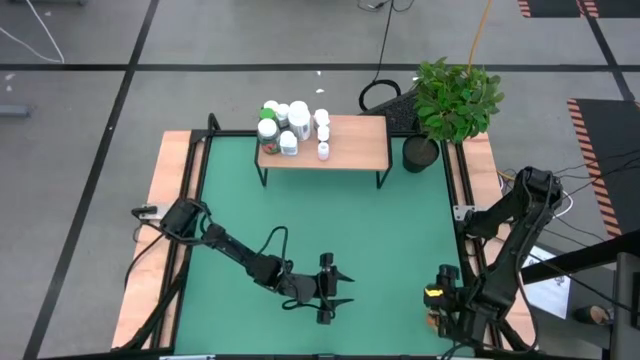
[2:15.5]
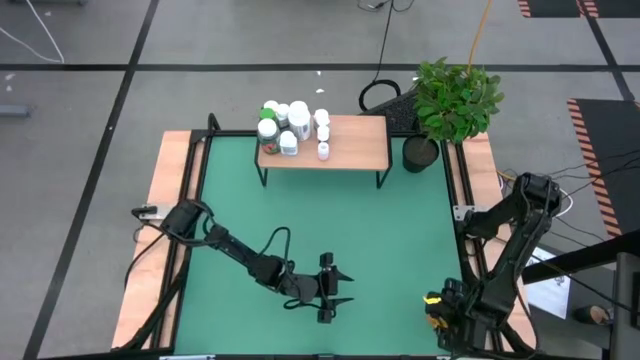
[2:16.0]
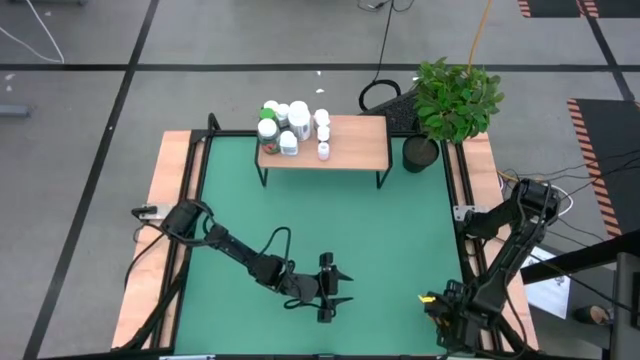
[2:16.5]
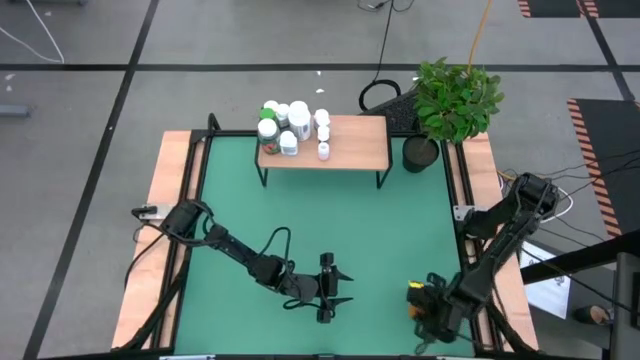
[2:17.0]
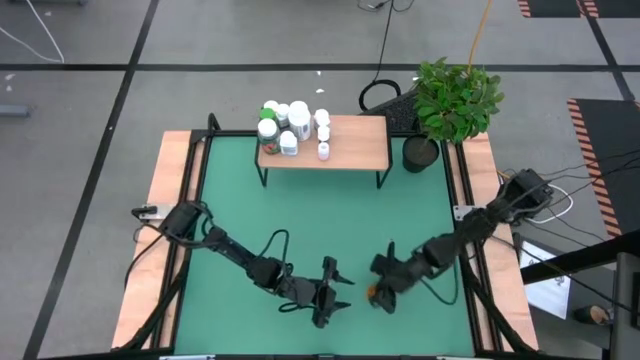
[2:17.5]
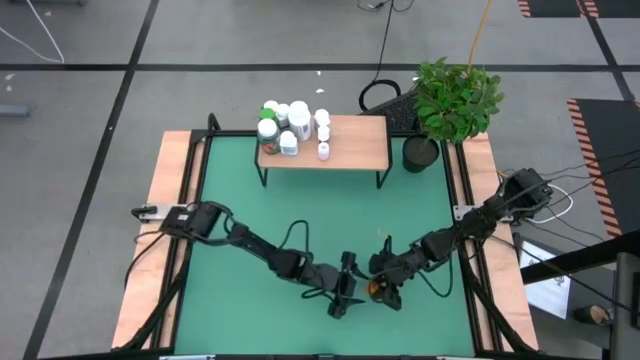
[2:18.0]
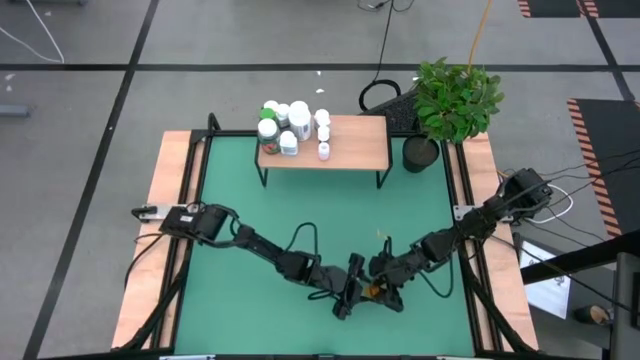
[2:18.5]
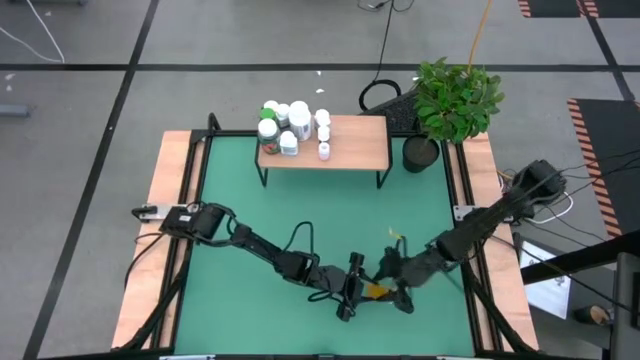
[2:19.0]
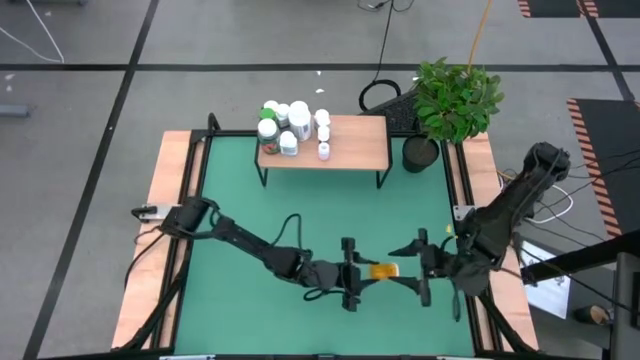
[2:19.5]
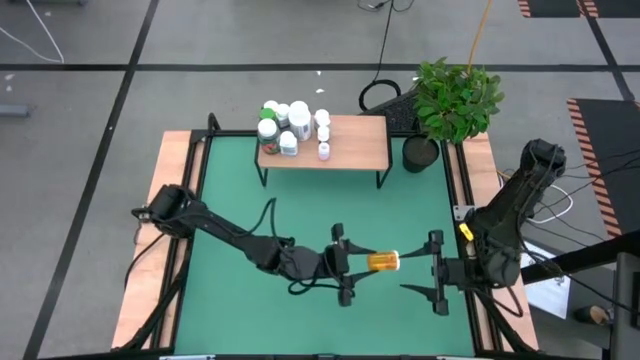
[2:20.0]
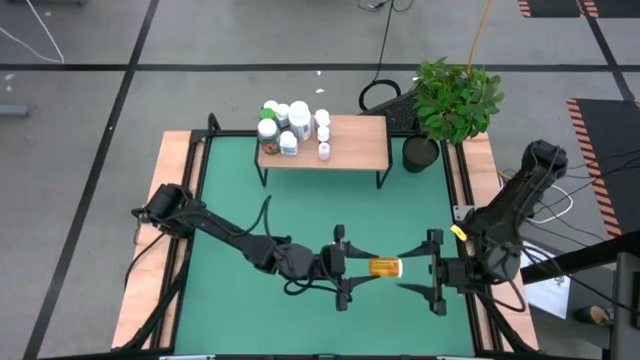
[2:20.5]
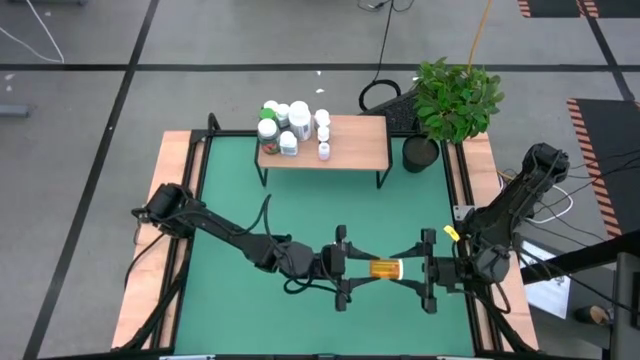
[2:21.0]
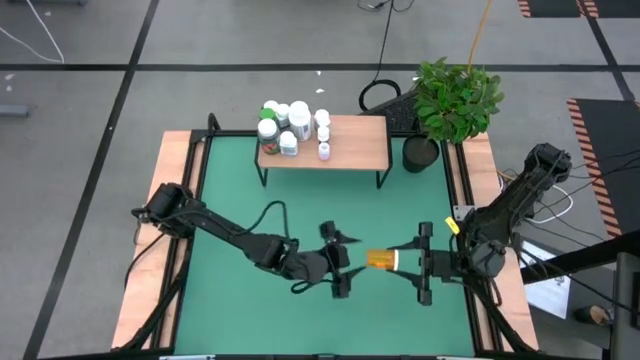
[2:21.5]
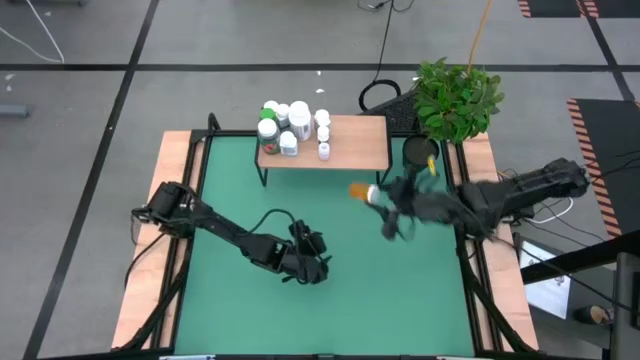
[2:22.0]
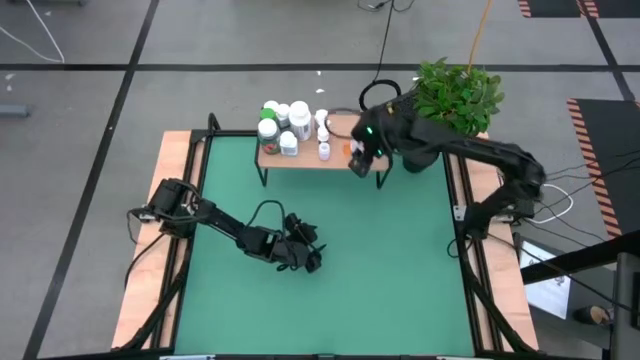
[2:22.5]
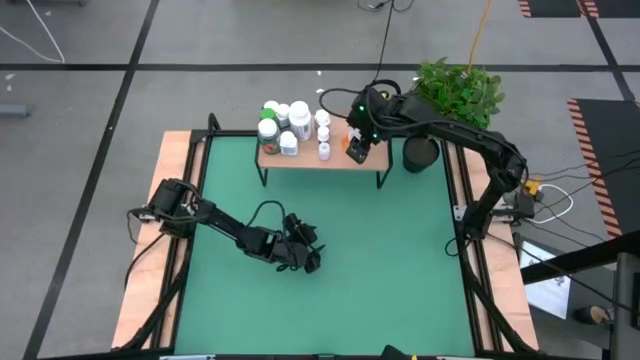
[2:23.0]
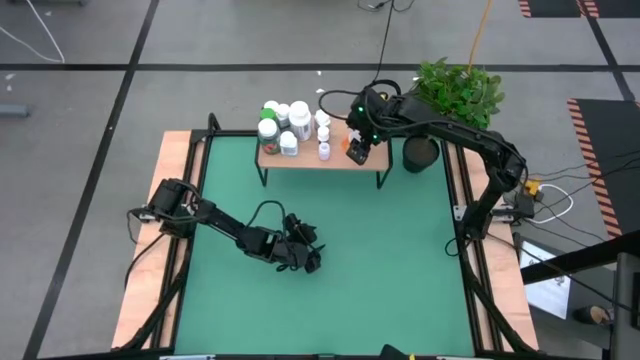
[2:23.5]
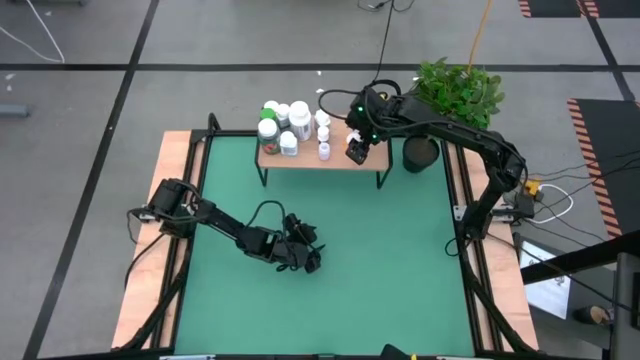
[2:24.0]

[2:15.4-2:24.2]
Task: Pick and place medicine bottles onto shelf by color
Put the orange bottle on the shelf

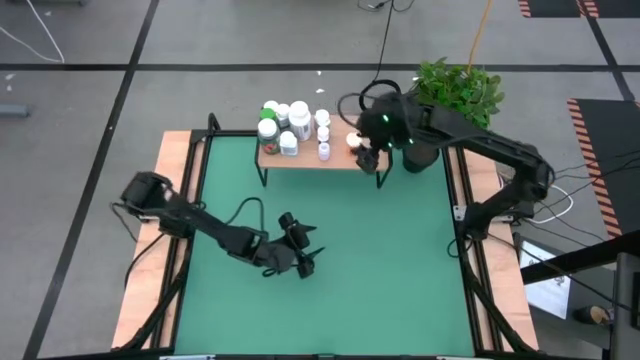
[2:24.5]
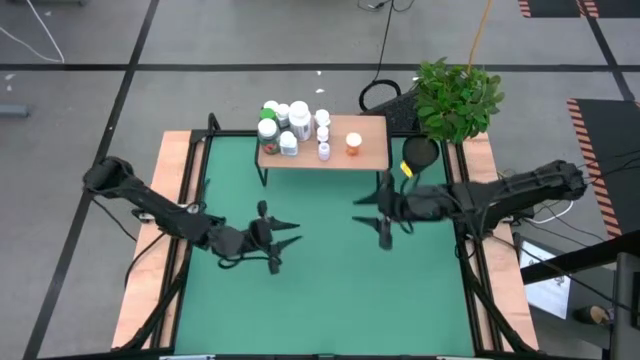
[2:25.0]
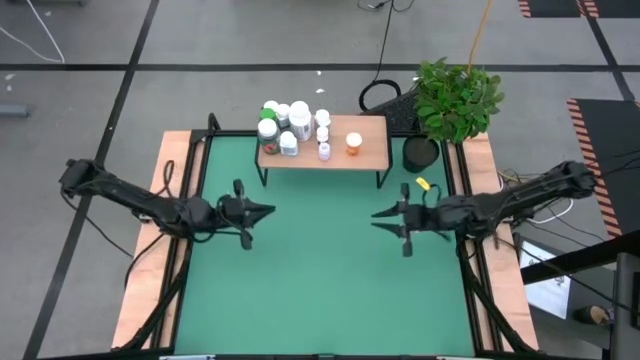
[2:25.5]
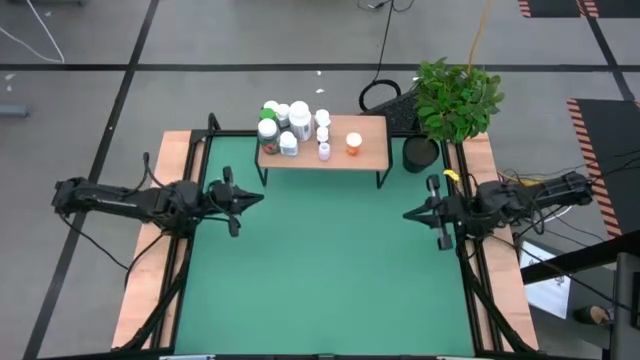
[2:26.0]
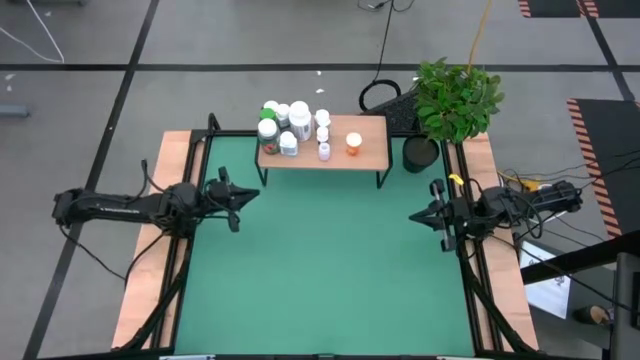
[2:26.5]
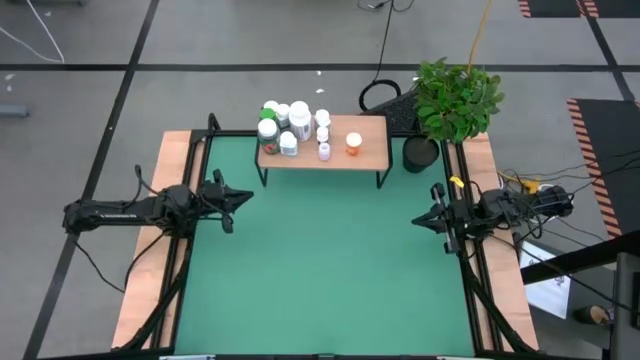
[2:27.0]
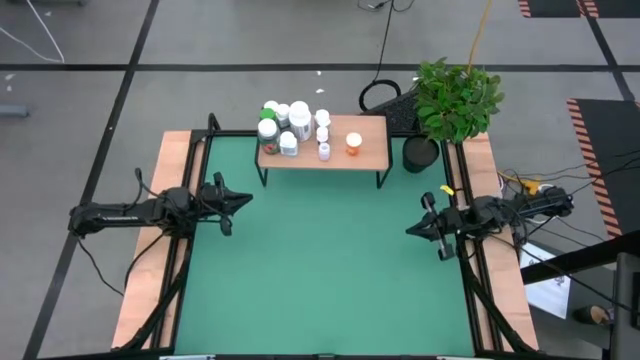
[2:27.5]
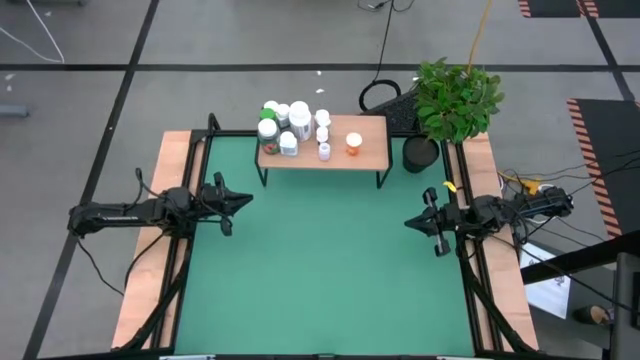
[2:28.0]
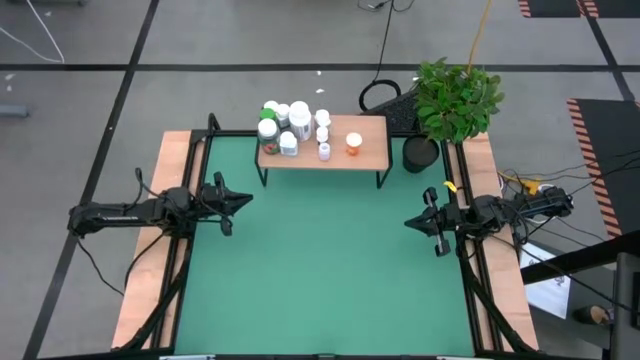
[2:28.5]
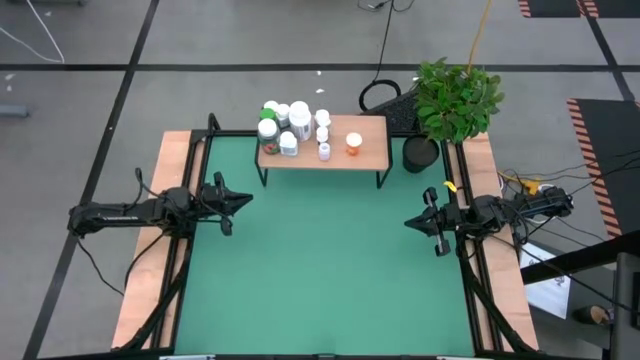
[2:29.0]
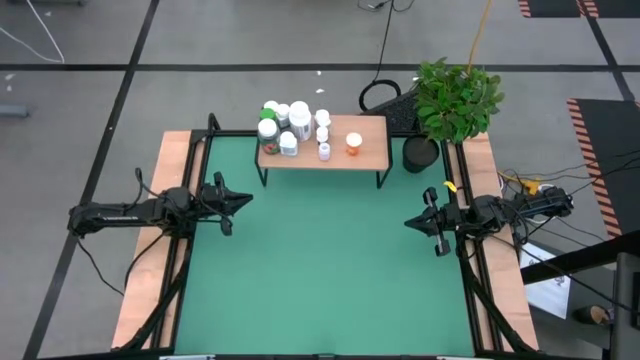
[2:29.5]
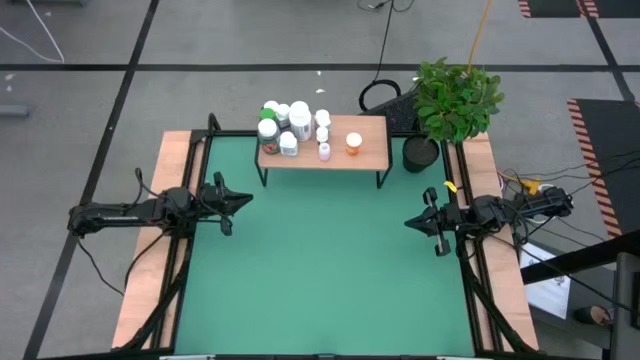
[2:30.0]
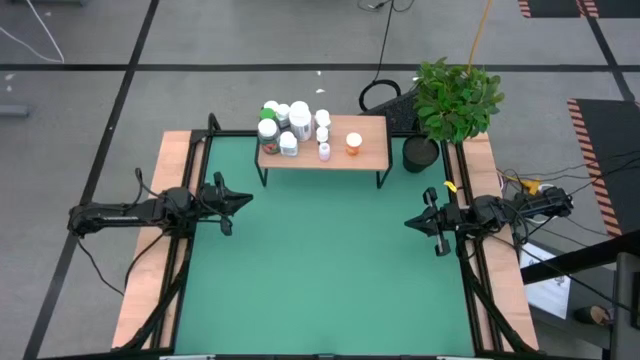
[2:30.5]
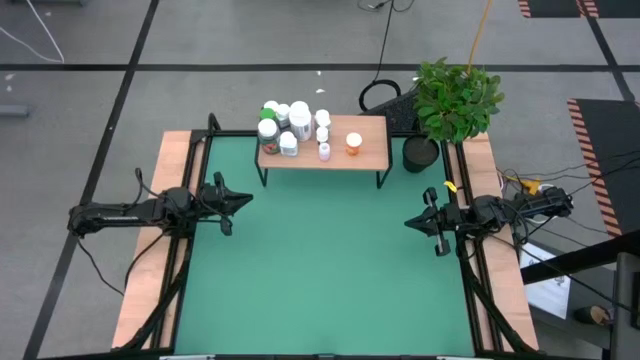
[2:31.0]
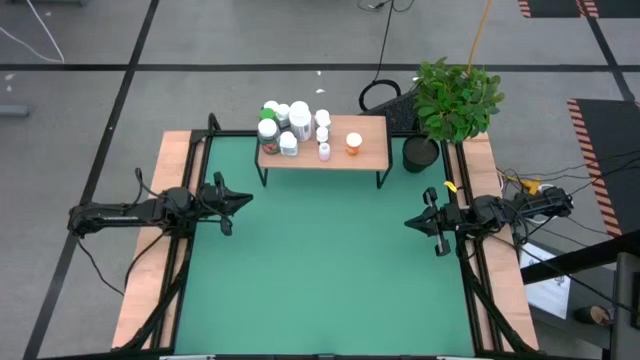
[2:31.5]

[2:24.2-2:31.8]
Return to Home Position

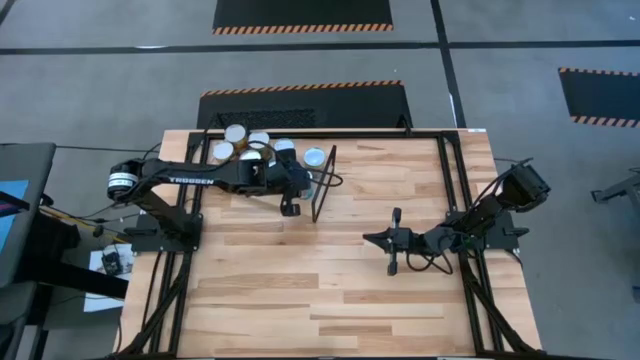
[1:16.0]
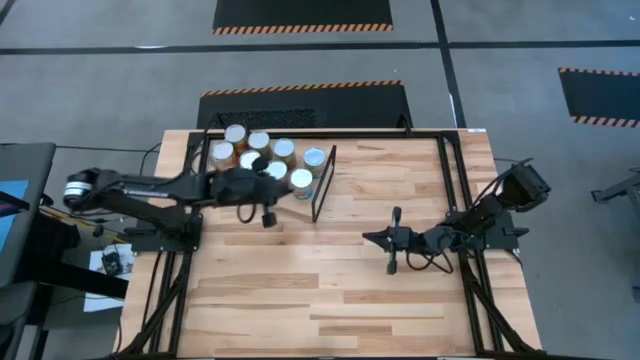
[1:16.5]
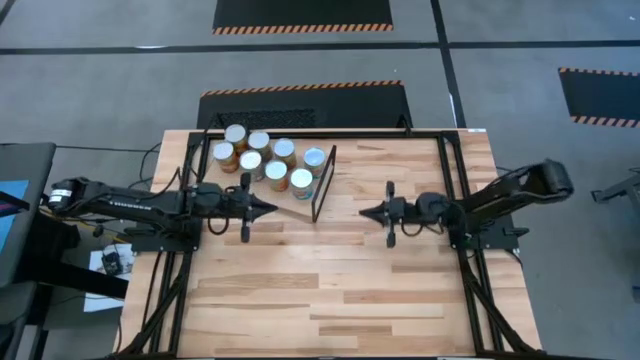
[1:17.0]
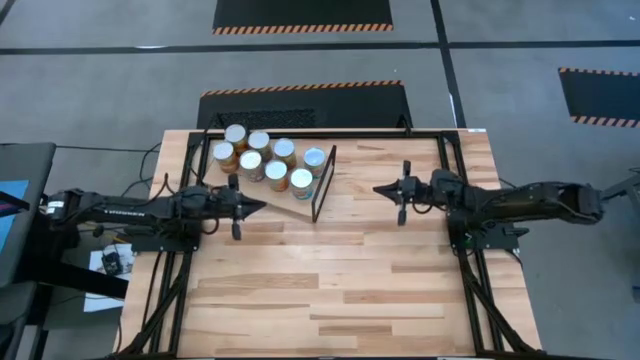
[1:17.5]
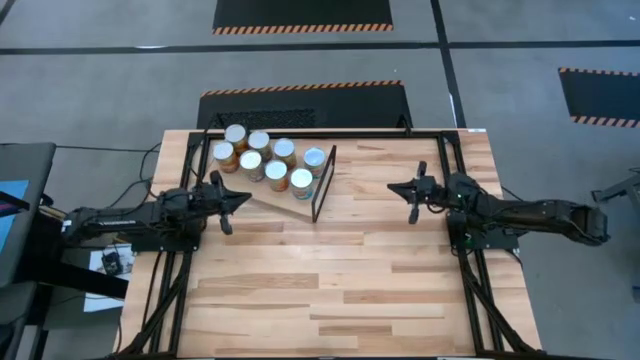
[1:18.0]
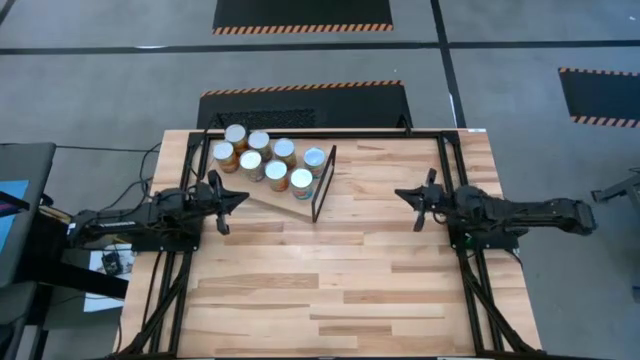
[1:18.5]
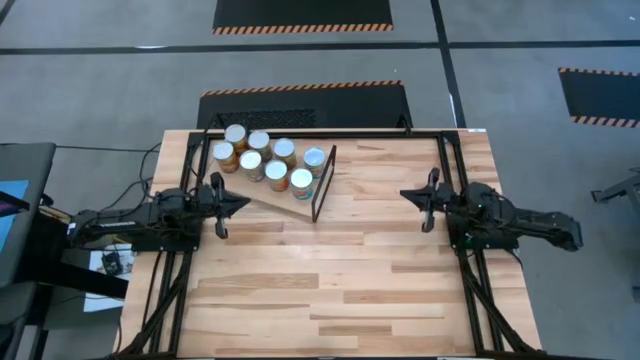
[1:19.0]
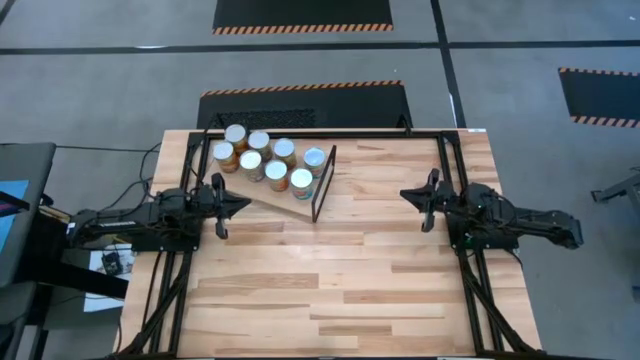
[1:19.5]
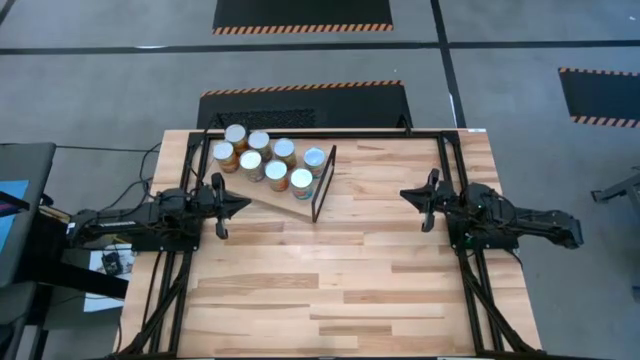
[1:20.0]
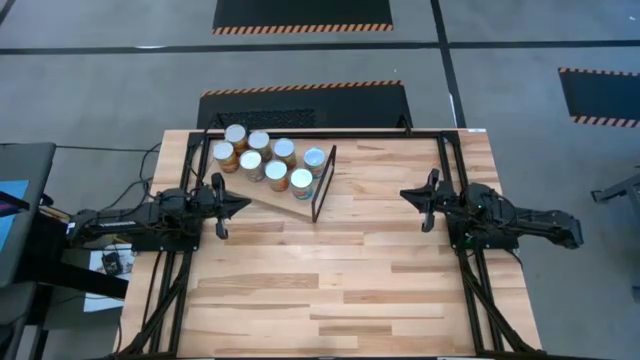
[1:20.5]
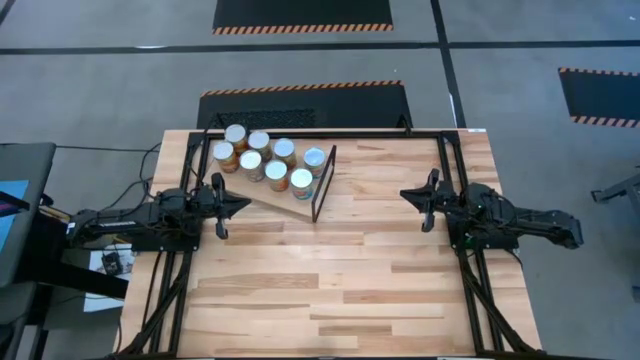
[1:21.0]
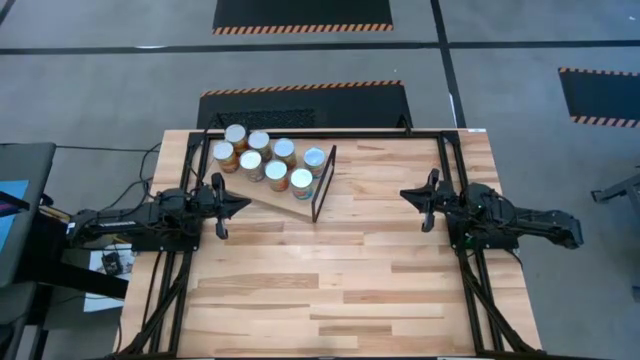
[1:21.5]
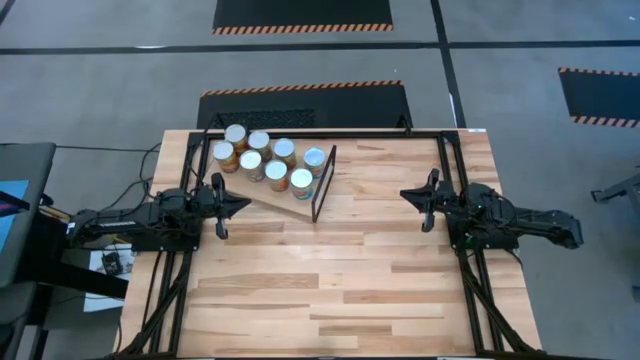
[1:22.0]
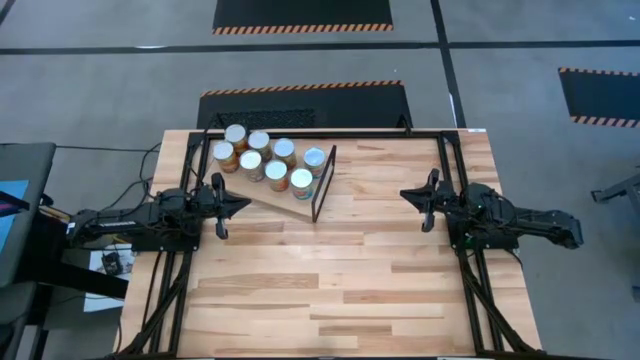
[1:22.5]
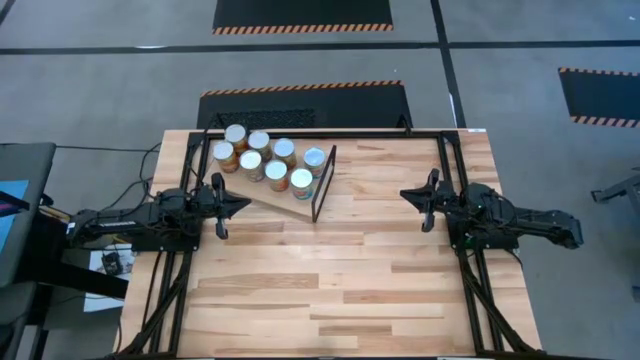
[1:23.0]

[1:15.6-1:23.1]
Task: Pick and place cans onto a shelf
Return to Home Position
